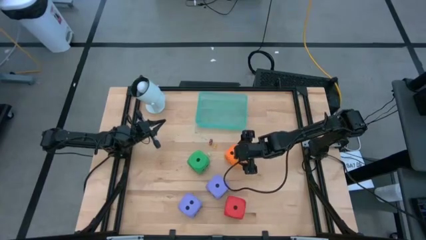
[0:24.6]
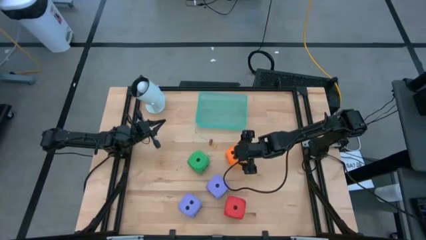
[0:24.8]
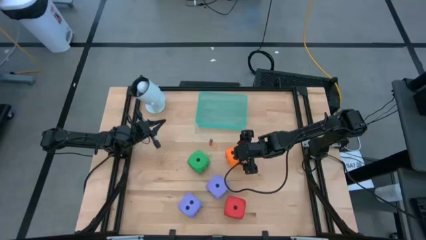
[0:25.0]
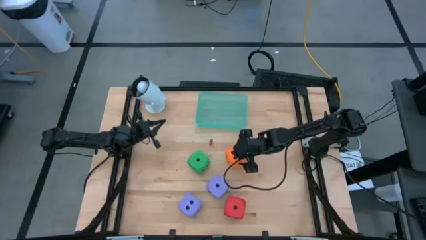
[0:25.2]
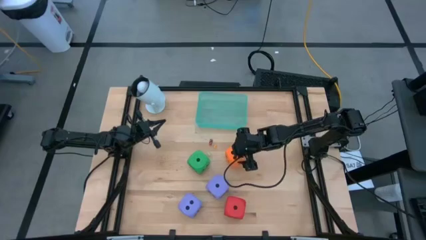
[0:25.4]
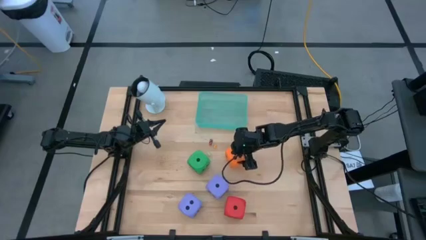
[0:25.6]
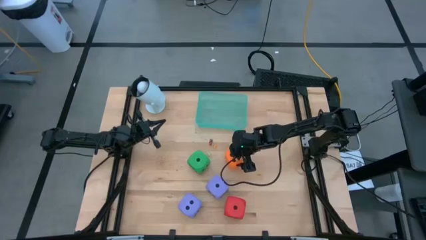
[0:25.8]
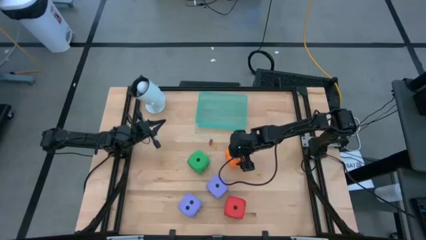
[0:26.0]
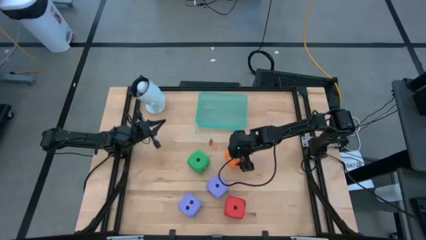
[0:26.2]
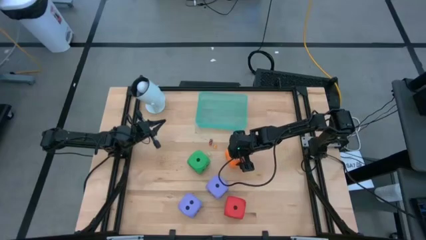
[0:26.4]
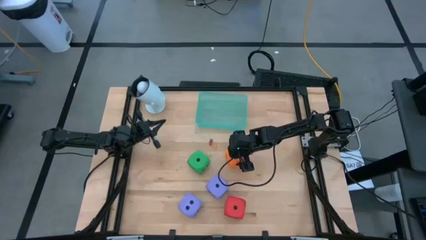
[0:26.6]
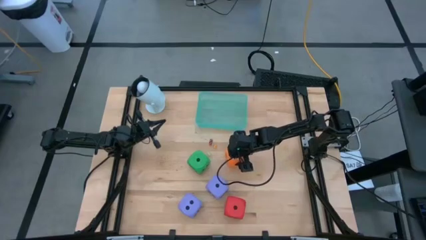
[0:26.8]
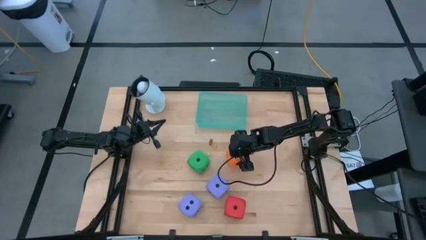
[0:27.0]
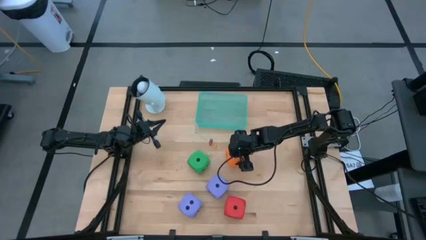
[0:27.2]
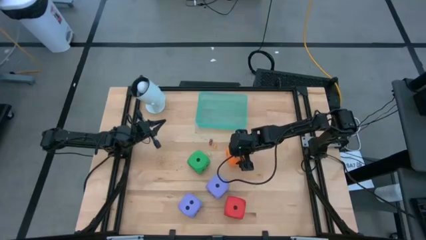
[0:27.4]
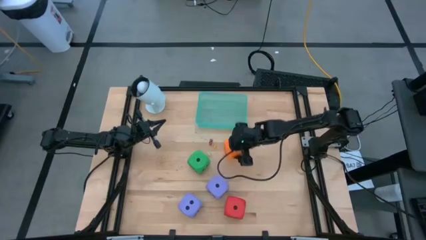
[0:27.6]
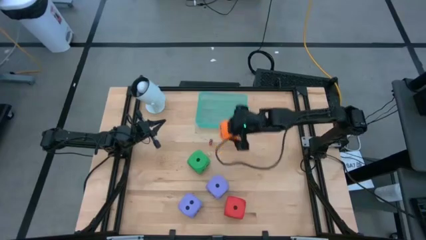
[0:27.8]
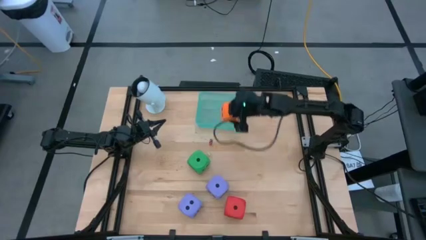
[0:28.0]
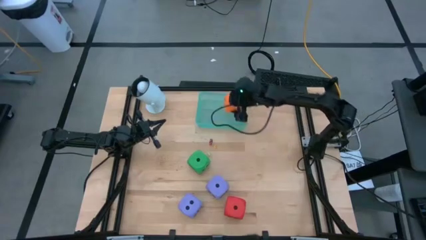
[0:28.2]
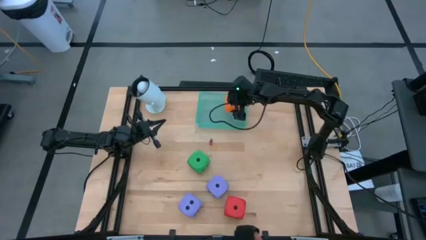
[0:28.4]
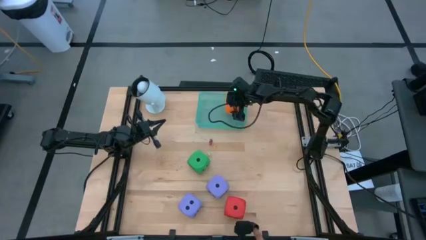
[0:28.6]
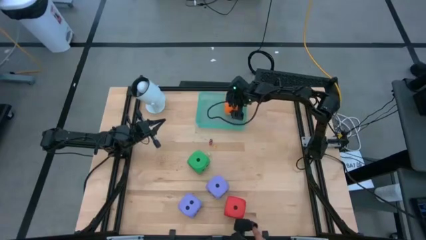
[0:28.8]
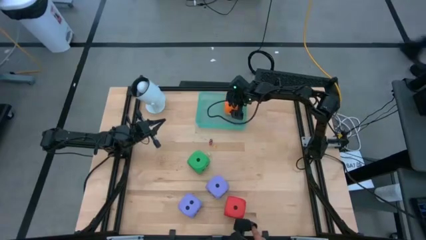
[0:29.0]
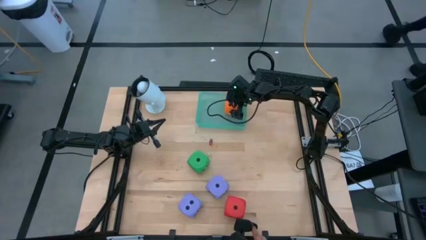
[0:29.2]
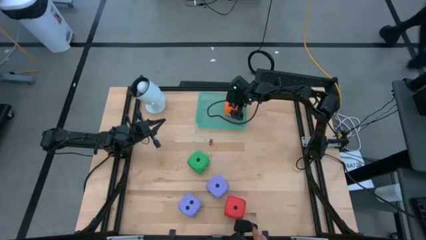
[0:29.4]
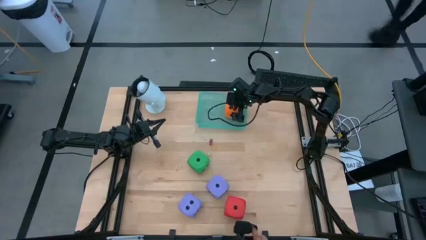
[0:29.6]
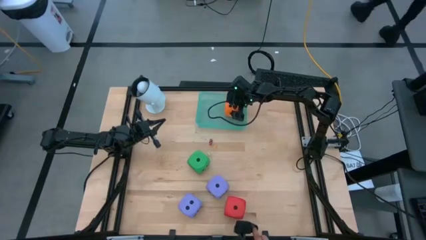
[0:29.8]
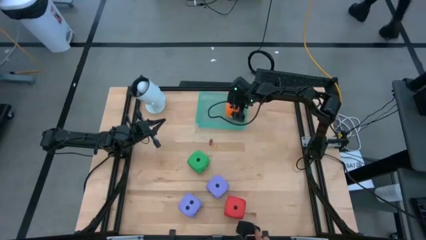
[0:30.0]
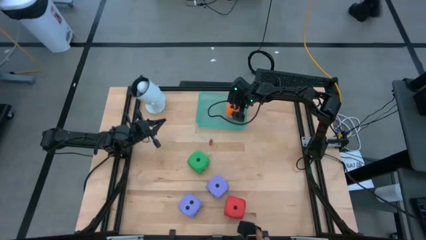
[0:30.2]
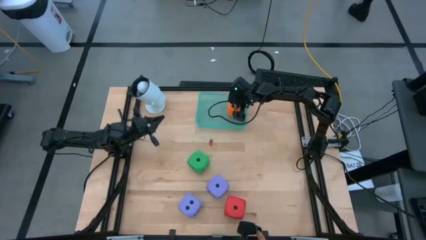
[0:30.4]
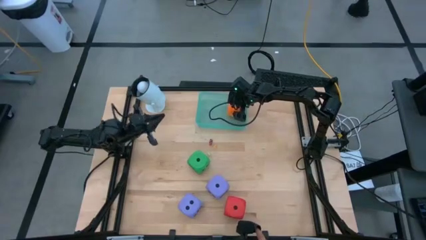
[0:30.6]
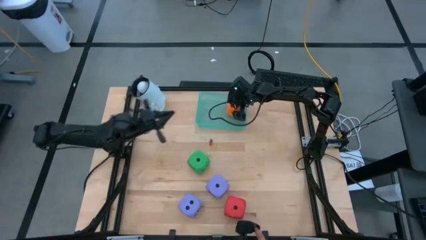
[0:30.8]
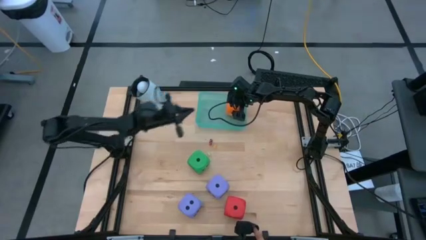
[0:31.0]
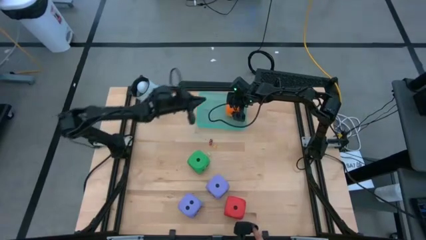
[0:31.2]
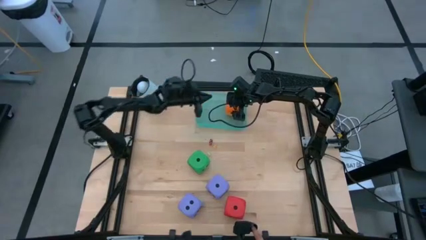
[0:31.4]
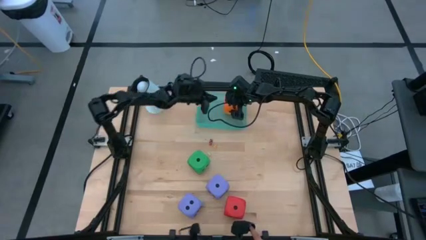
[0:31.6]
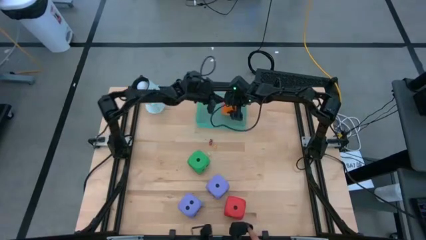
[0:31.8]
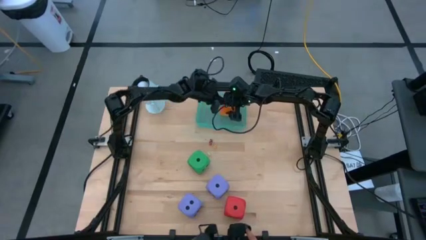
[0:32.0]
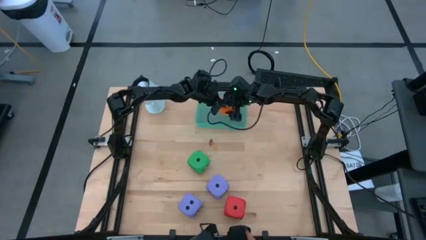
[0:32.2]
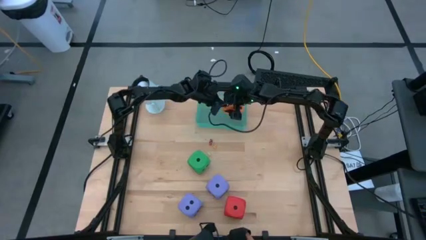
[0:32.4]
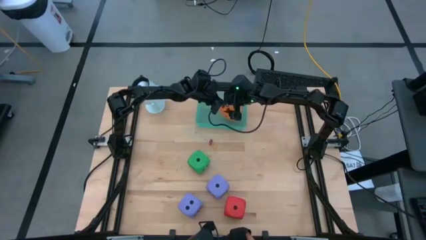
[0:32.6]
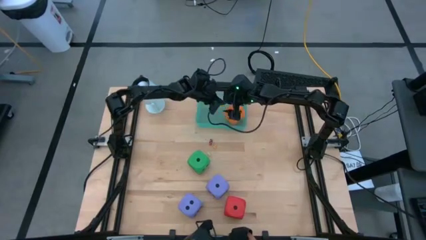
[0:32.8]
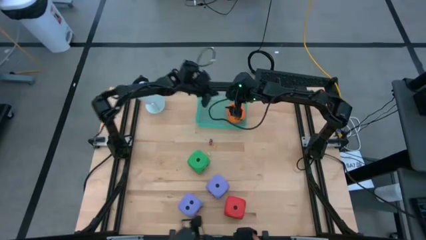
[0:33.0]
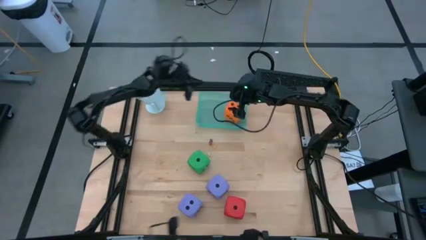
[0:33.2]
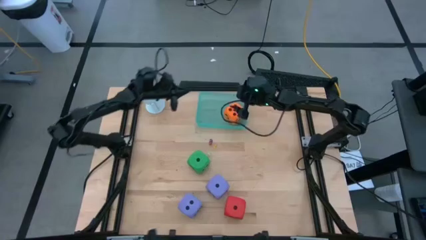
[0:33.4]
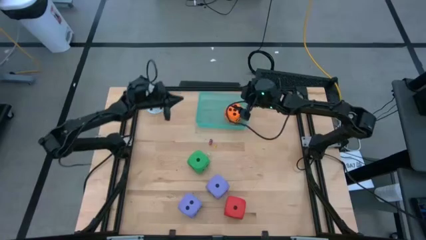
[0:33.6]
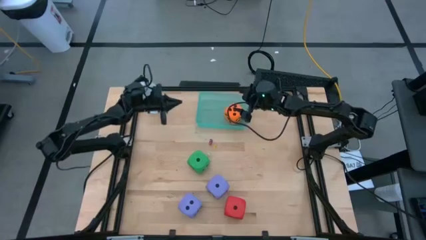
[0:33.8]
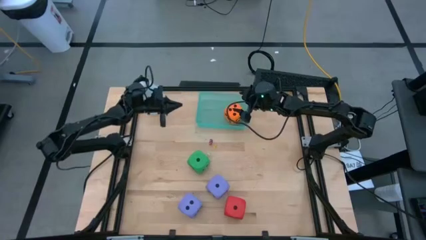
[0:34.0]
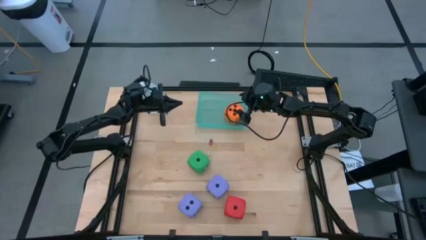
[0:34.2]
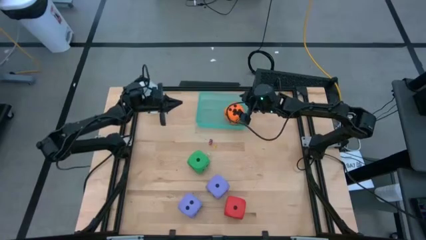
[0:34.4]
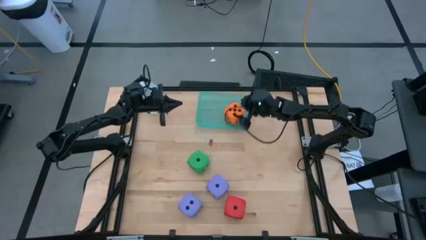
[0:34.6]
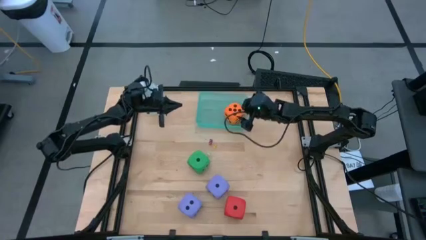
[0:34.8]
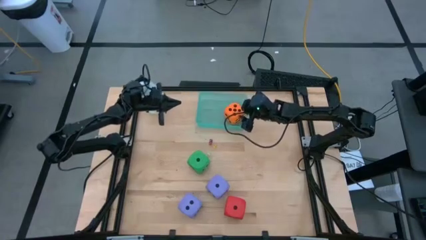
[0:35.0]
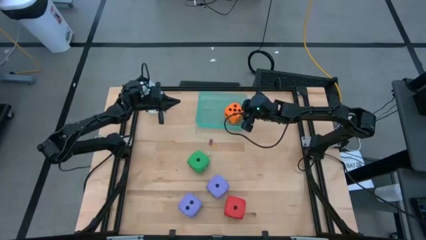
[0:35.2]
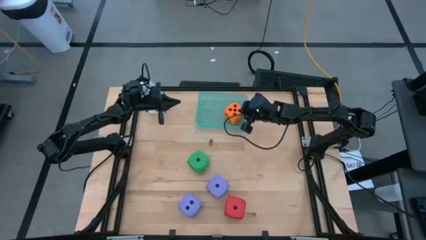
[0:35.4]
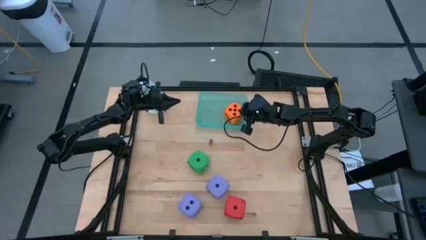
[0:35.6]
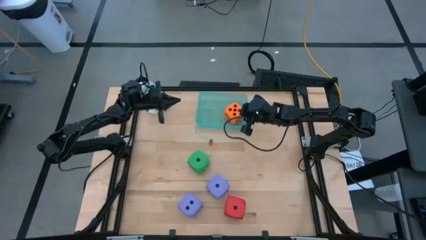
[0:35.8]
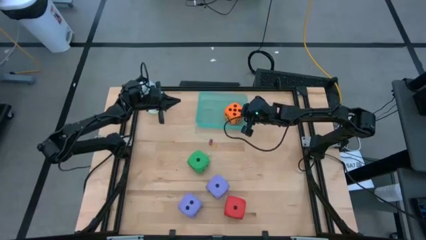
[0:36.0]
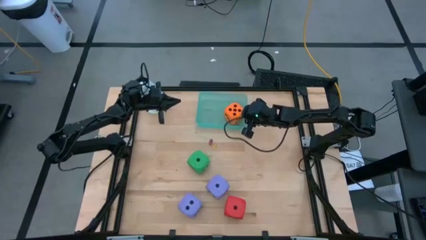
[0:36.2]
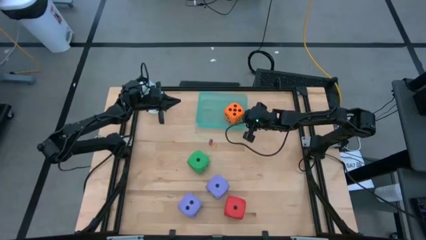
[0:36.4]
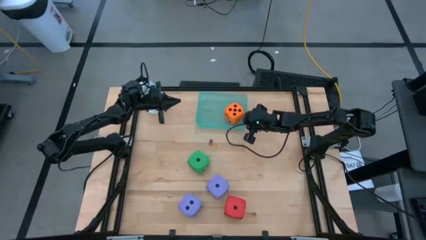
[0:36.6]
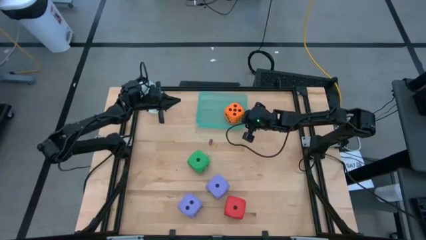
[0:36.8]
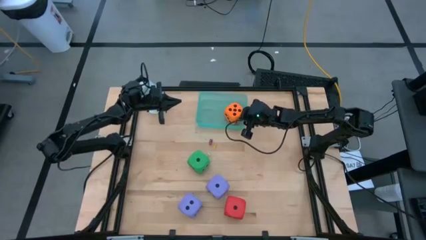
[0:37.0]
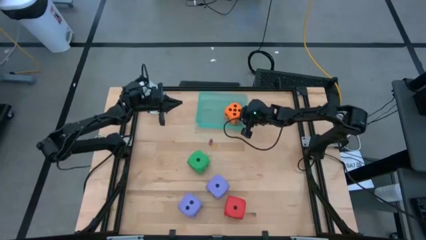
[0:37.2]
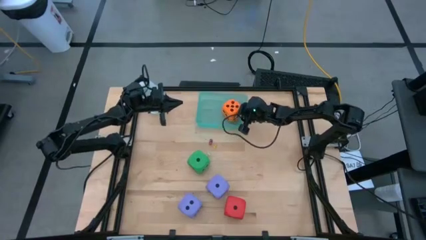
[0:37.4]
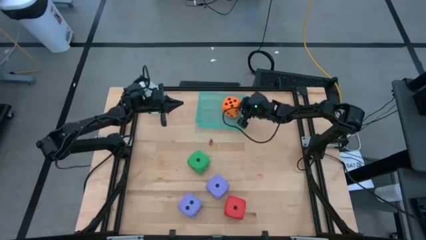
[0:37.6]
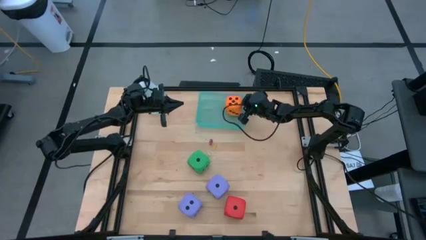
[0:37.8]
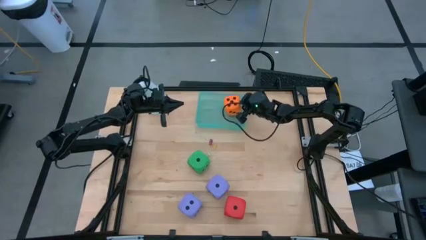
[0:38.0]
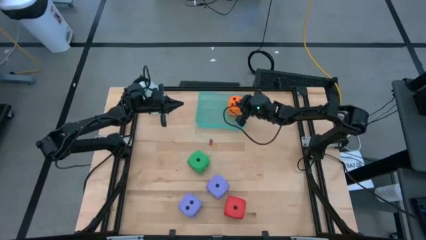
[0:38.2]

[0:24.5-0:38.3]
Task: Pick & Place Dice
Put the big orange dice into the bin

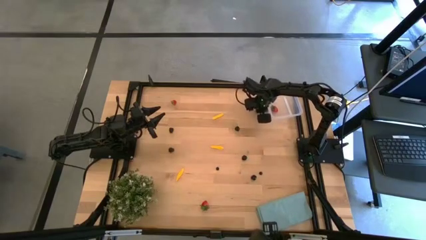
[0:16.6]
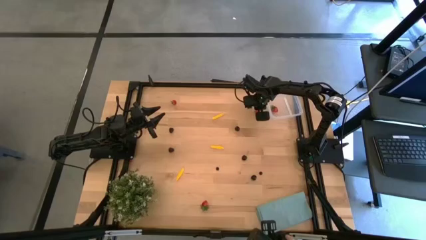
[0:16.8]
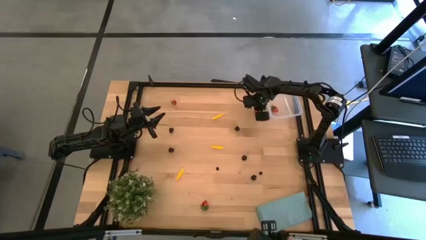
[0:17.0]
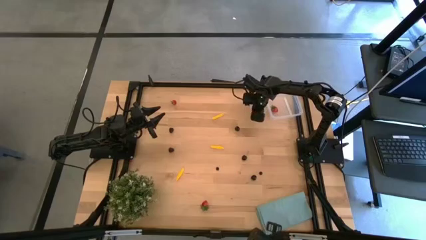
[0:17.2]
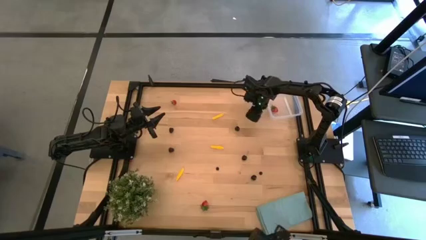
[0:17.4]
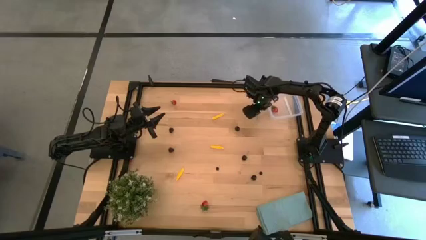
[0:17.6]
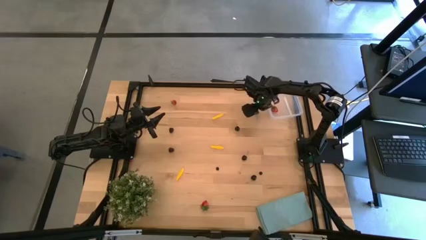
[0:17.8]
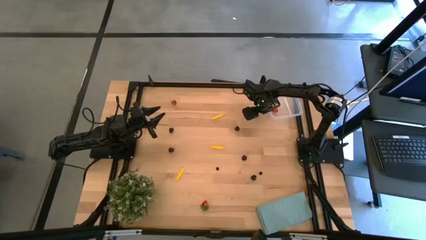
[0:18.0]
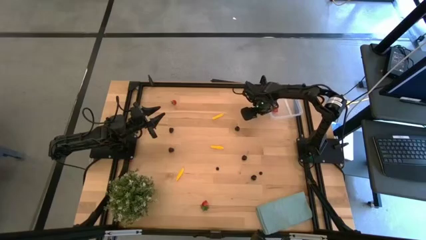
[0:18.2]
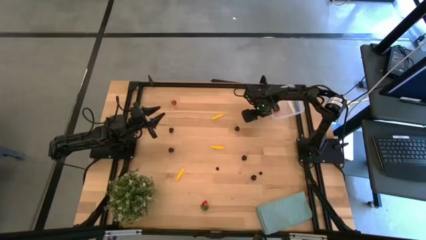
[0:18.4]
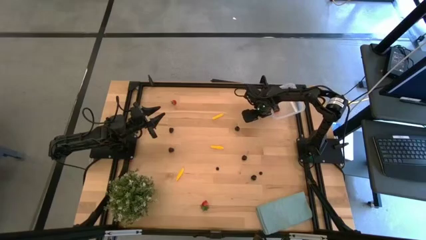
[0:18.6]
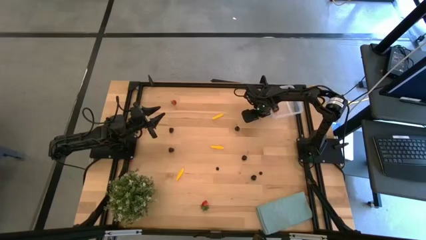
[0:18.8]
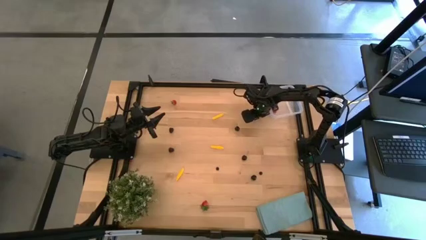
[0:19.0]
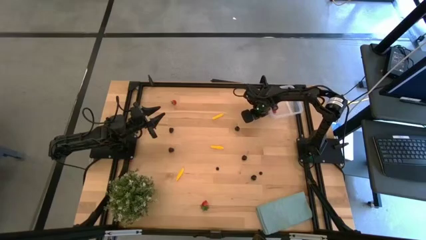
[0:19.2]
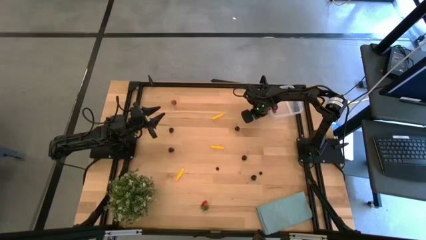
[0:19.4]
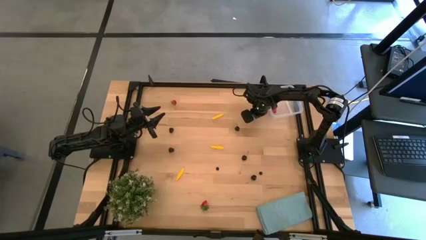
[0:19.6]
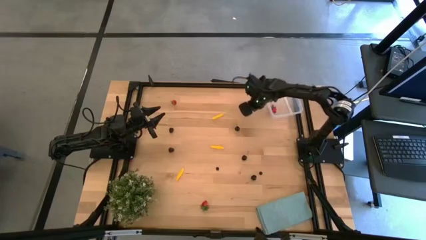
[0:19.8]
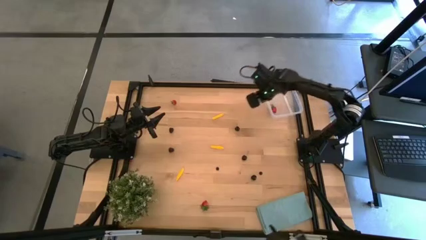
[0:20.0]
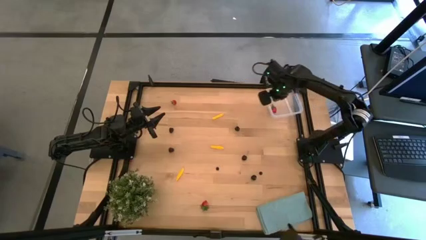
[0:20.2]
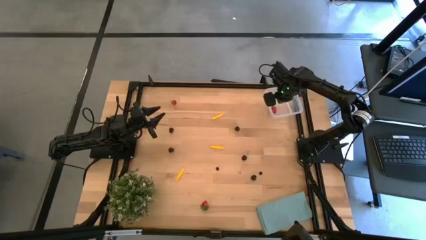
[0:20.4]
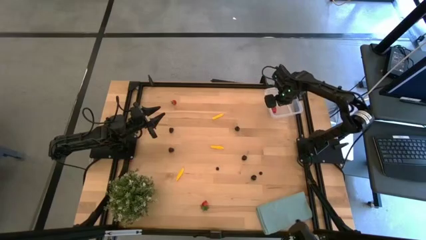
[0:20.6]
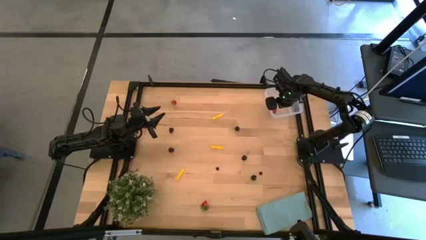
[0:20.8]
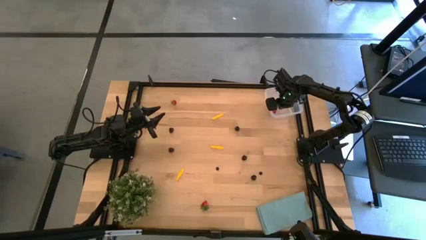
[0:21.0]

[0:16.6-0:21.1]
Task: Pick and placing Produce into tupperware
Put the red strawberry into the transparent bin
